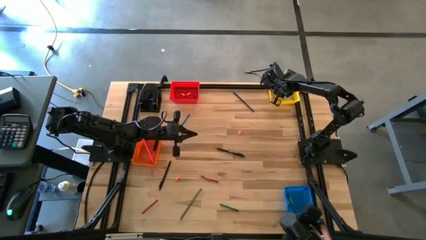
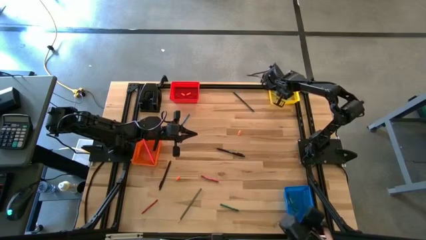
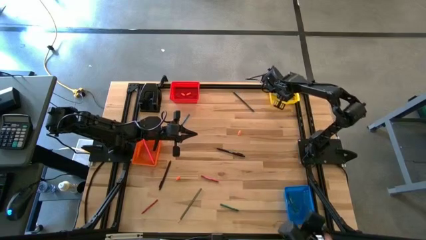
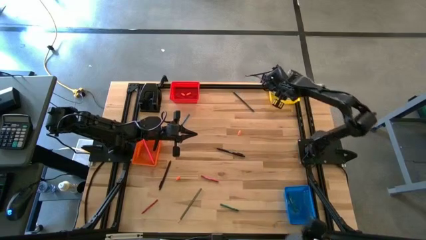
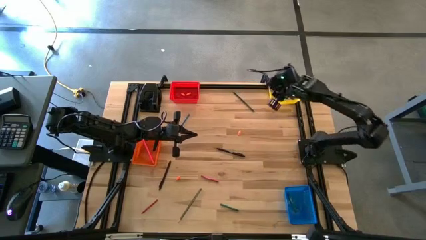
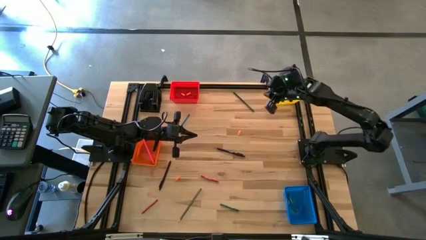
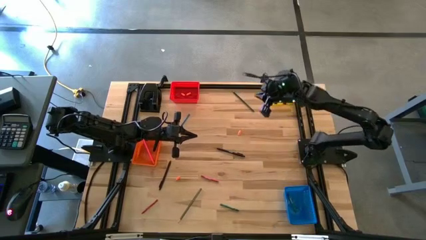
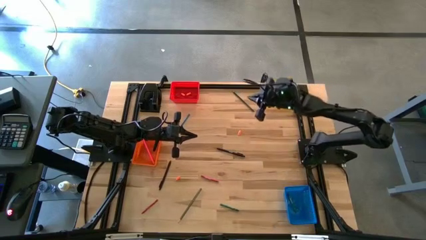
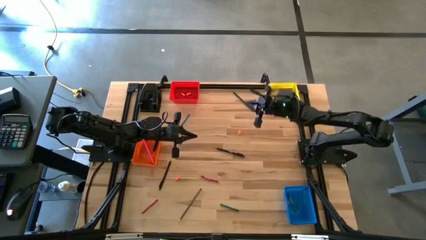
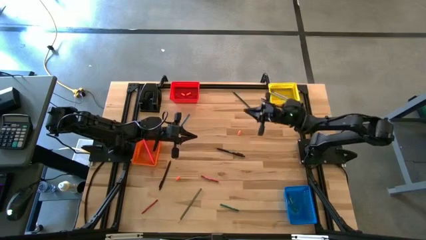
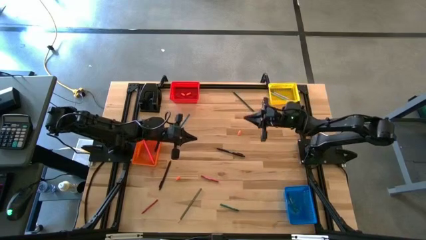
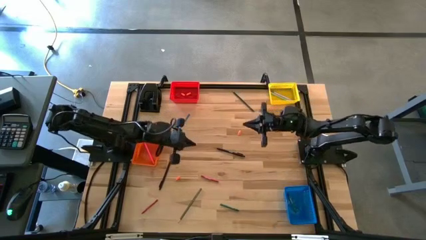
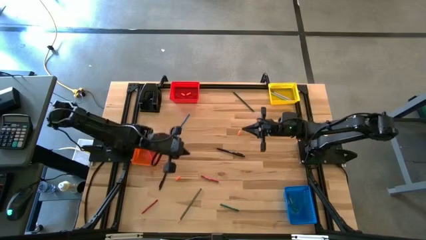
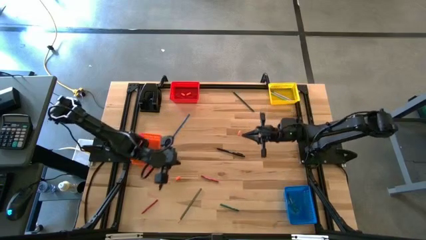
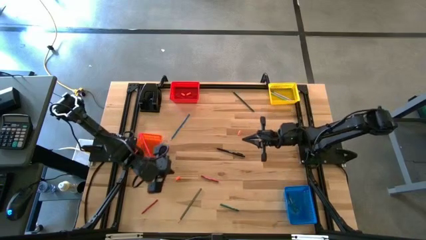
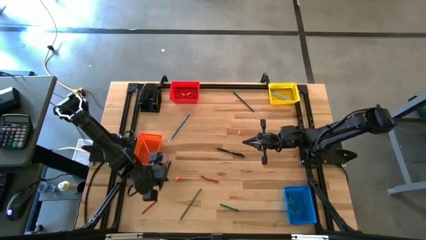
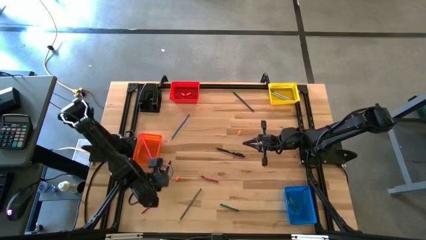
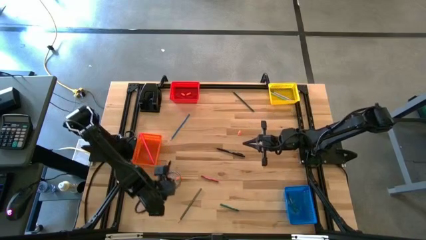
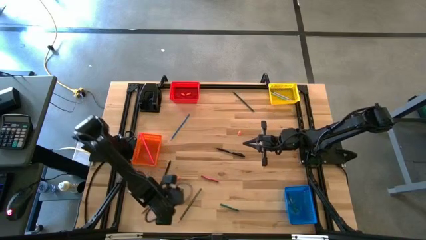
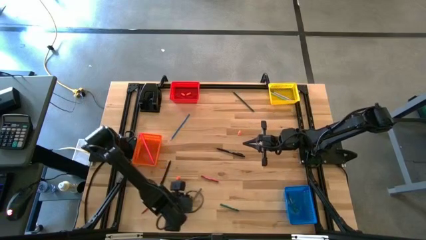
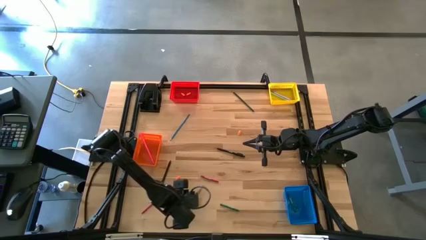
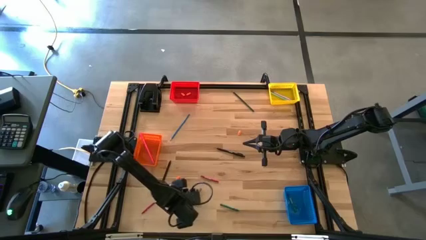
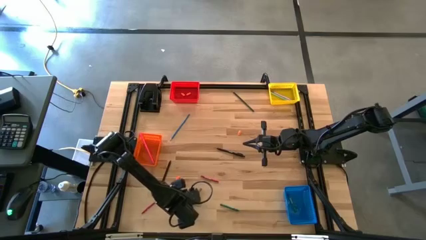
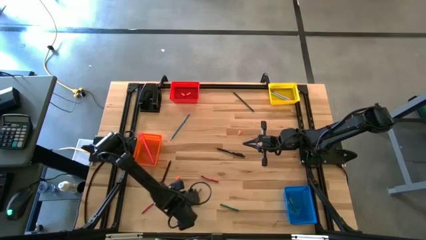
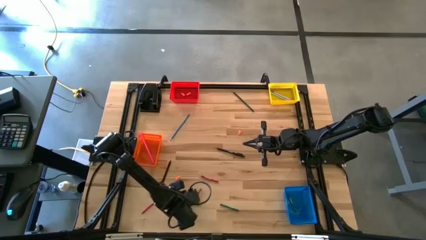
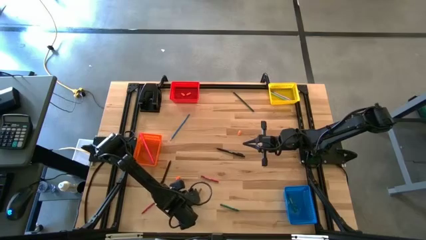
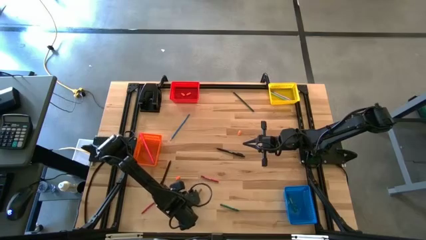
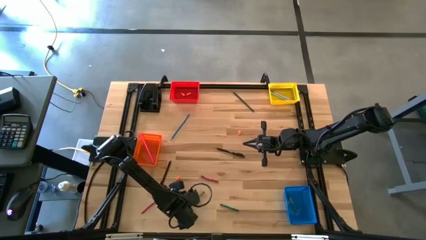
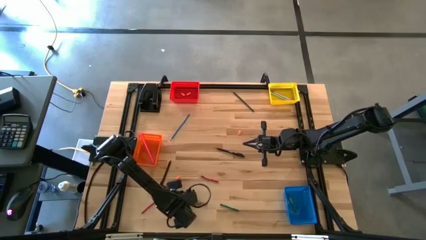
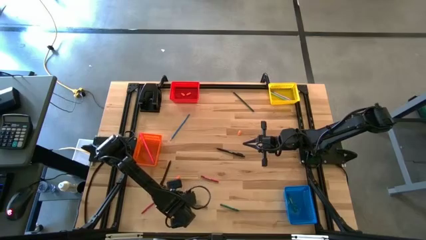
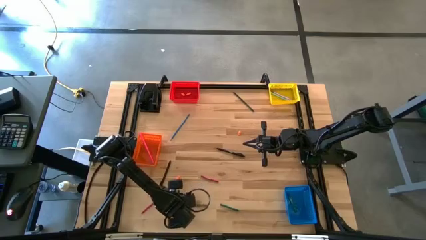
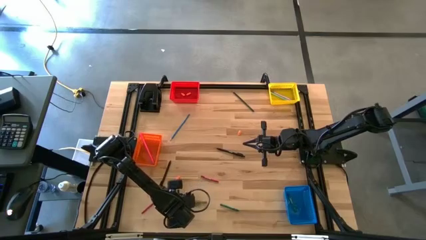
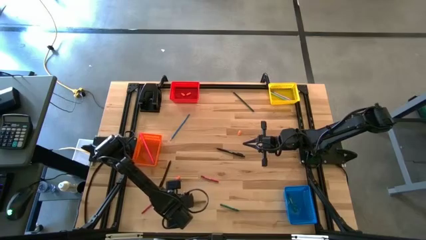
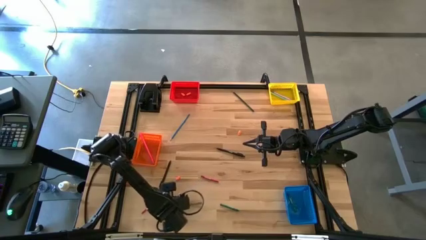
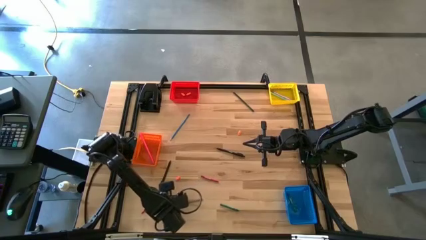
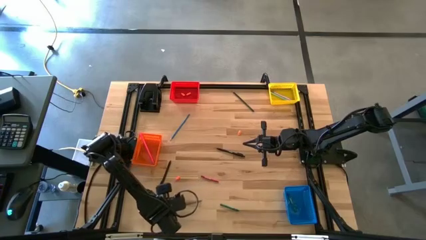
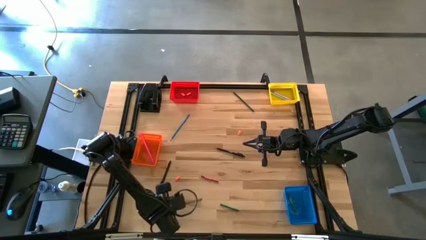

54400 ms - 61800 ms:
Task: Sort crayons/erasers/pens/pencils in bins
Put the dark blue pencil into the orange basket

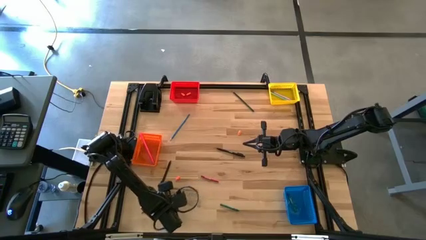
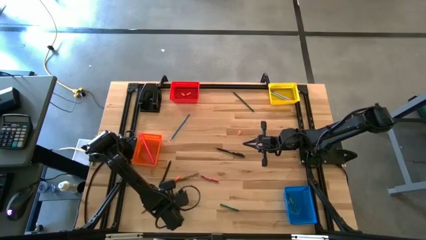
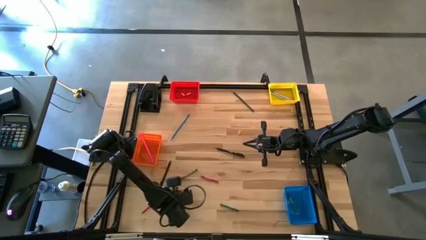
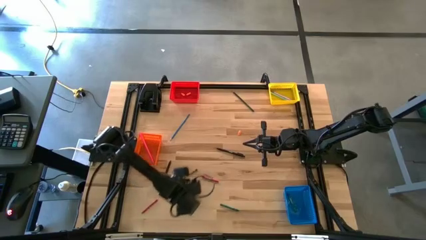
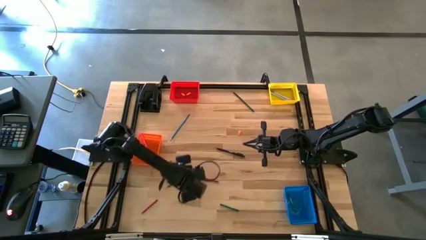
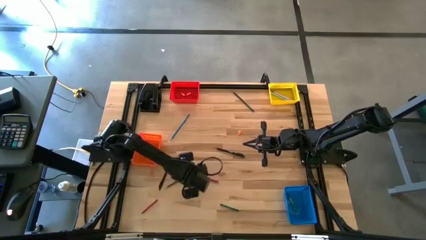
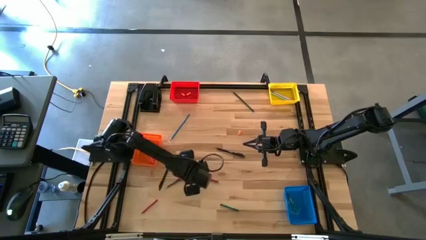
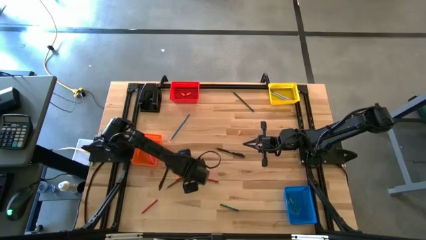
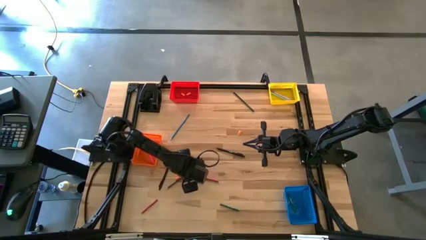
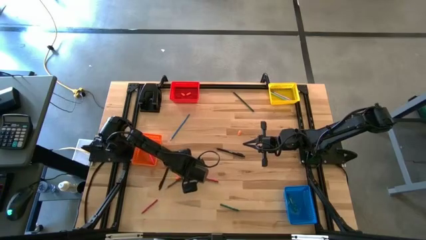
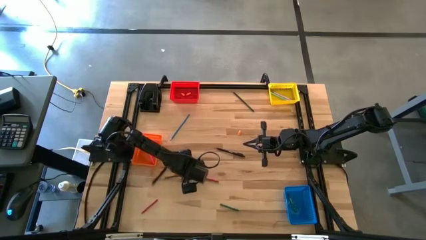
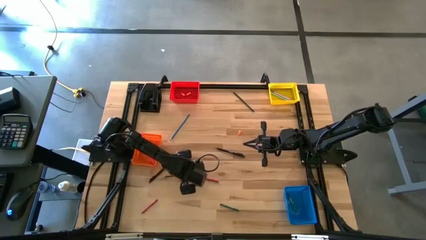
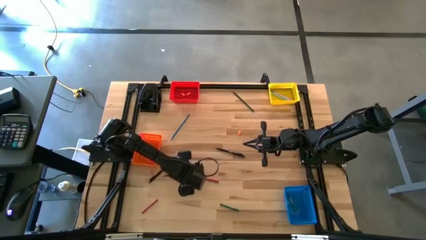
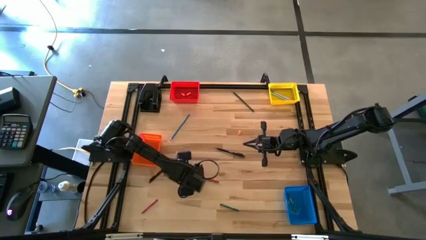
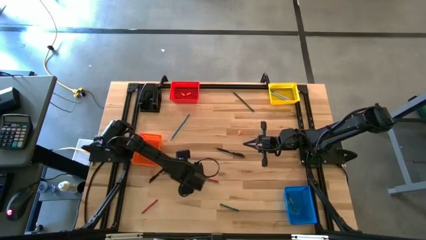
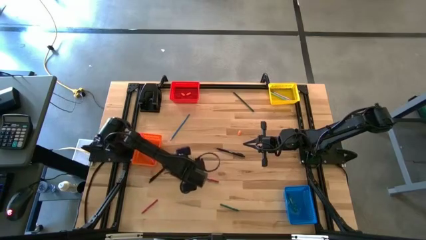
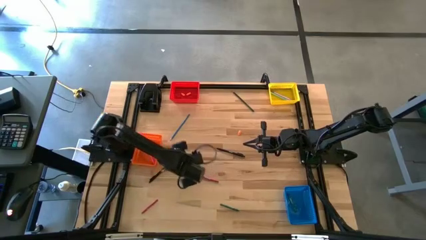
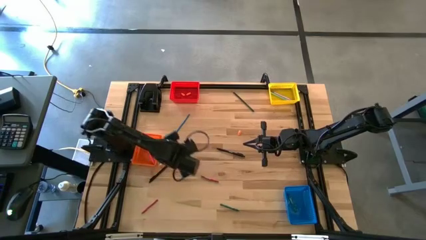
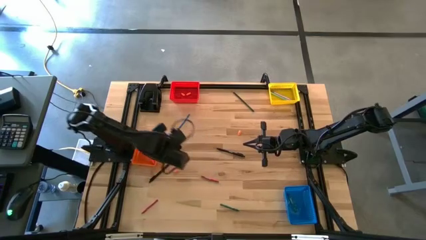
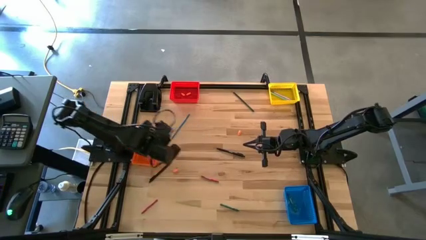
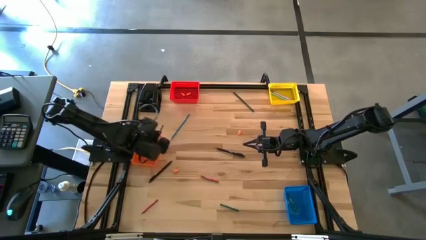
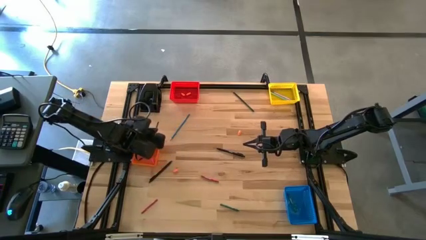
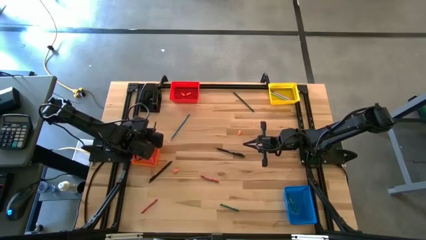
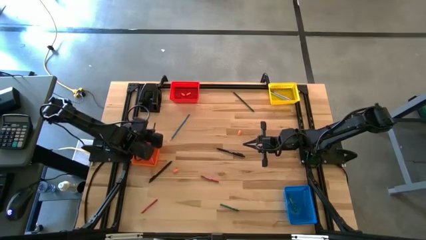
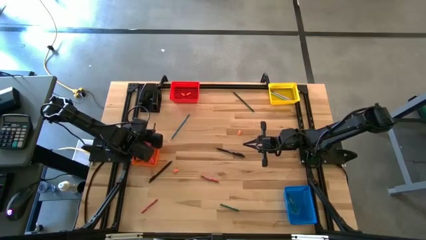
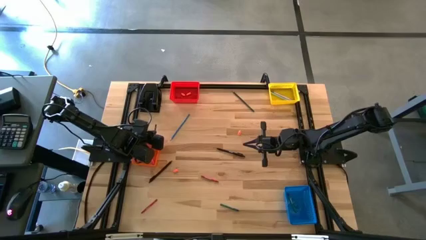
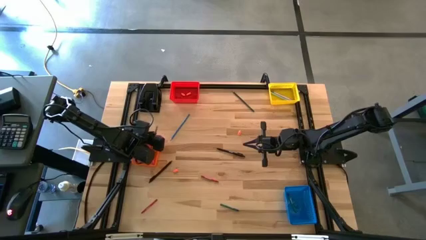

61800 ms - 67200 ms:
Put the dark blue pencil into the orange basket

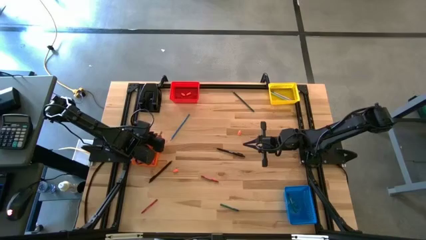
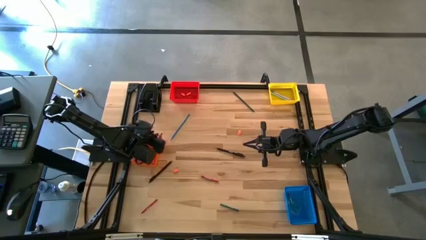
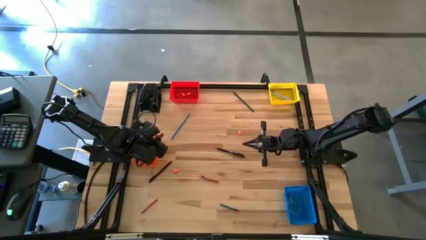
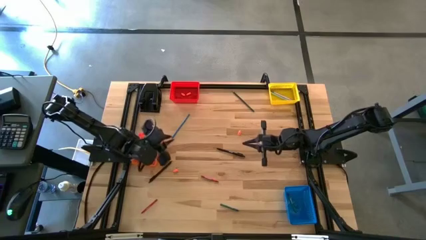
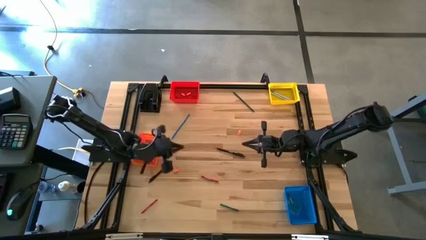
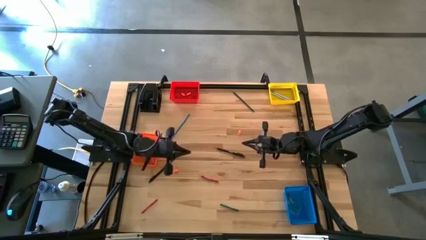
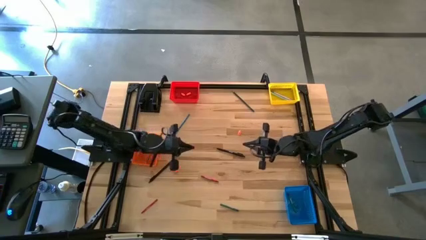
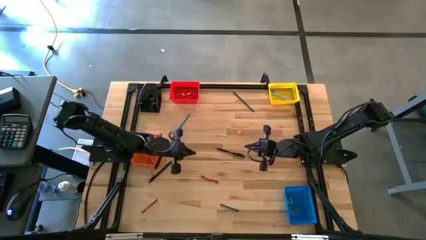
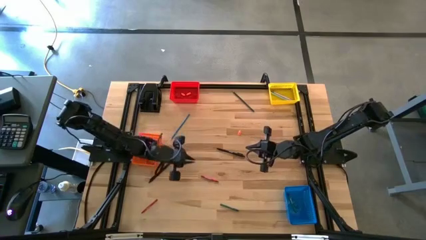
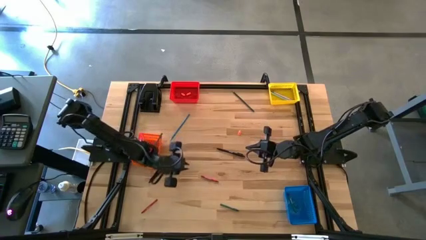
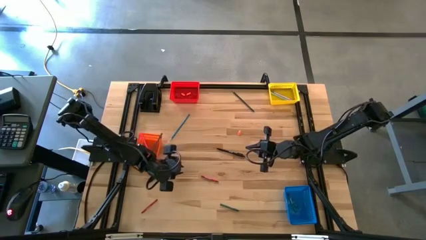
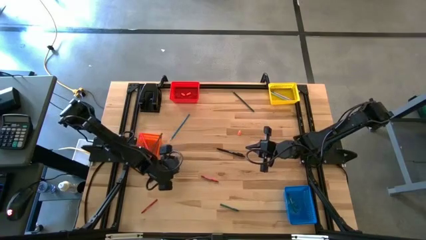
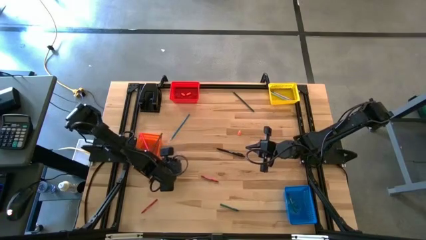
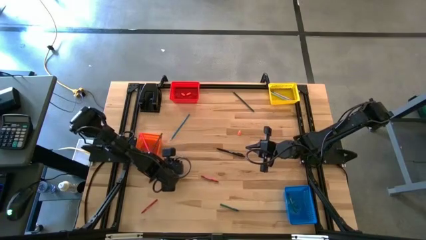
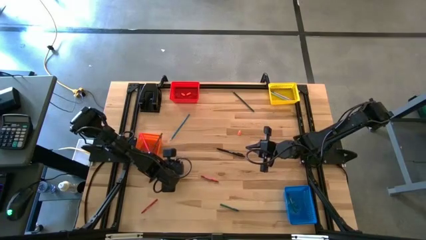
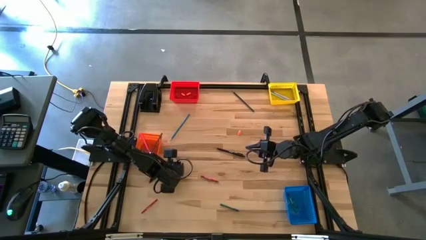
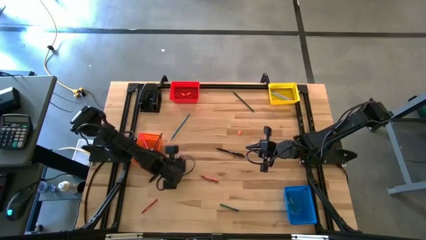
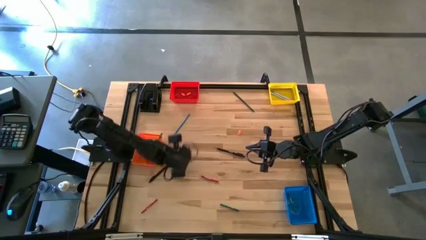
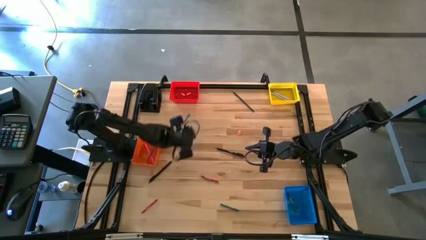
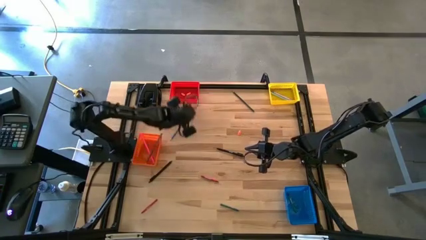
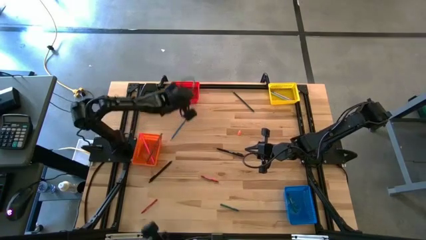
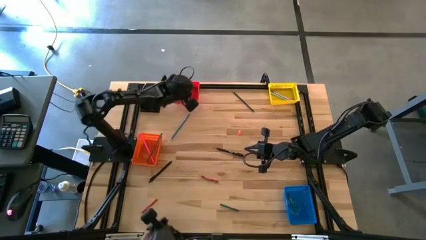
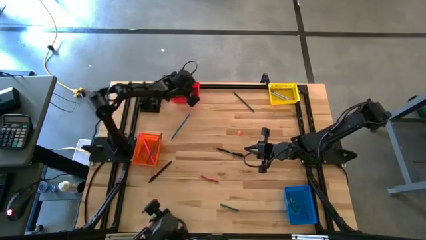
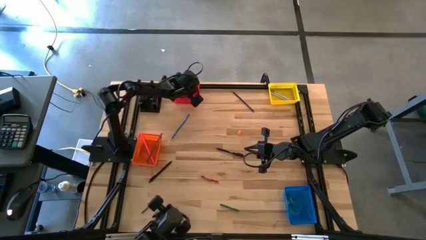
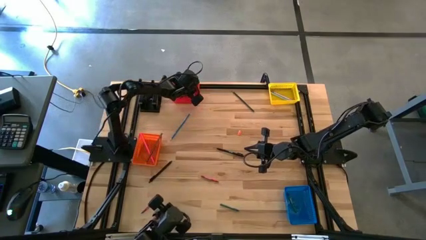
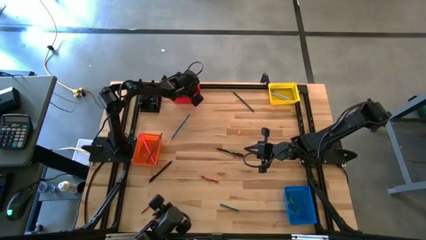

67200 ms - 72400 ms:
Put the orange pencil eraser into the red bin
